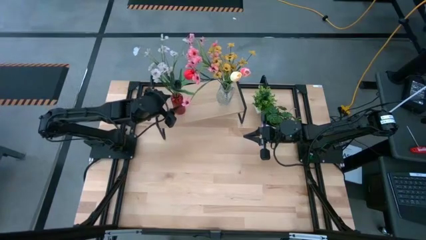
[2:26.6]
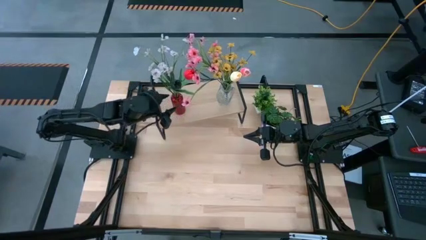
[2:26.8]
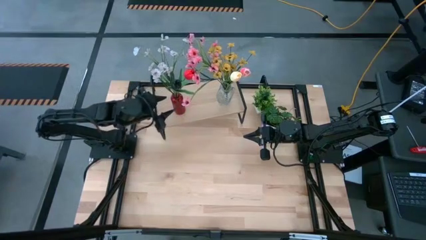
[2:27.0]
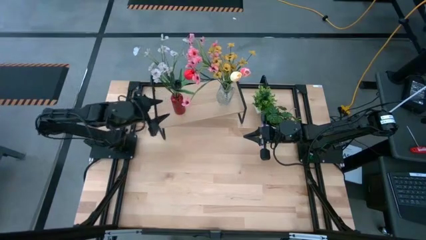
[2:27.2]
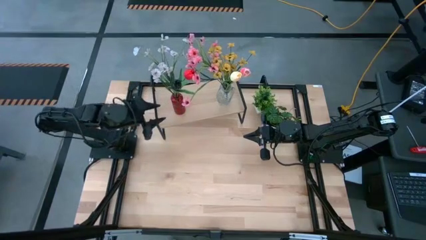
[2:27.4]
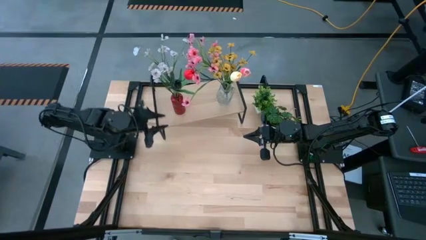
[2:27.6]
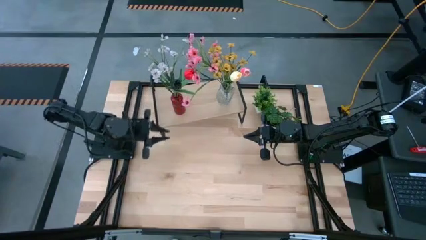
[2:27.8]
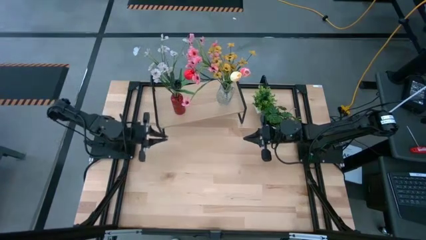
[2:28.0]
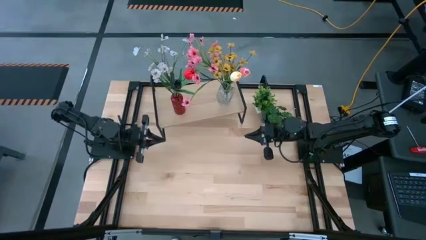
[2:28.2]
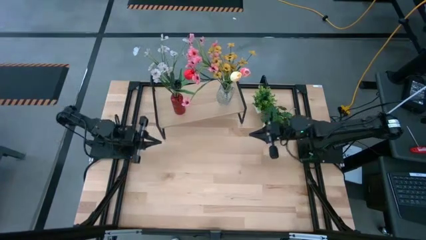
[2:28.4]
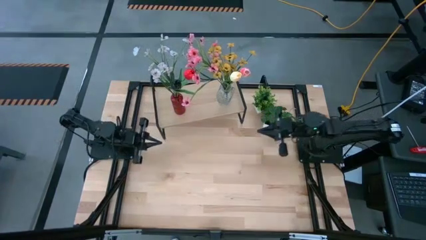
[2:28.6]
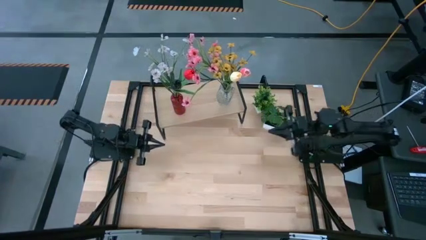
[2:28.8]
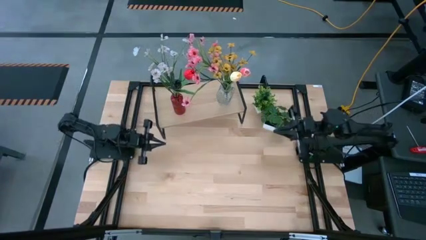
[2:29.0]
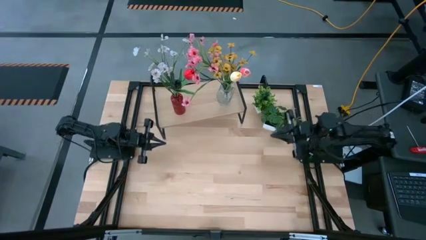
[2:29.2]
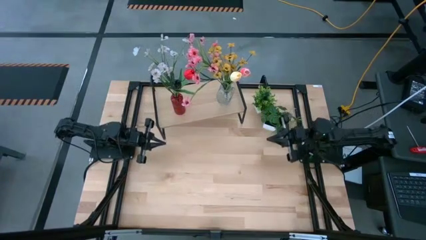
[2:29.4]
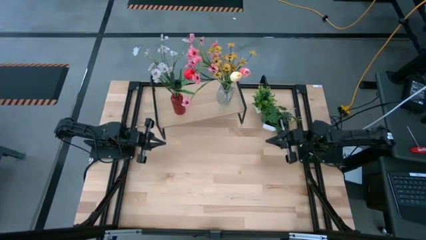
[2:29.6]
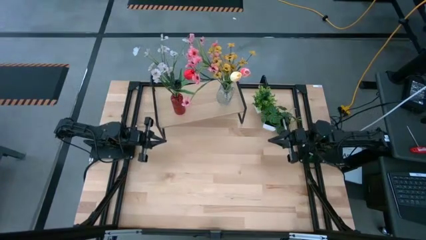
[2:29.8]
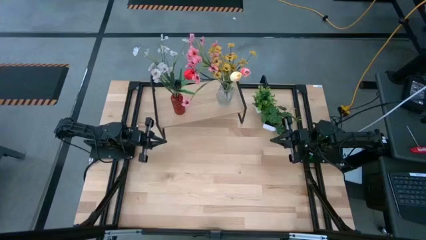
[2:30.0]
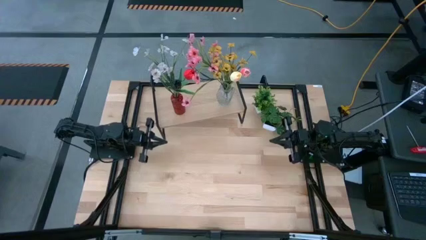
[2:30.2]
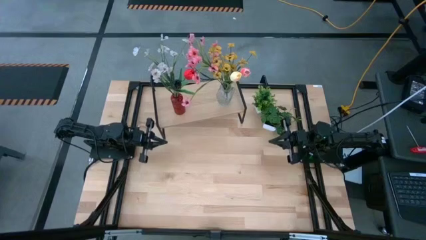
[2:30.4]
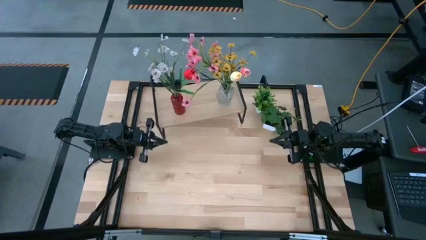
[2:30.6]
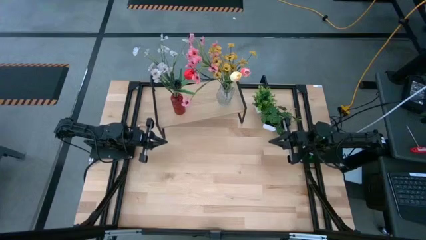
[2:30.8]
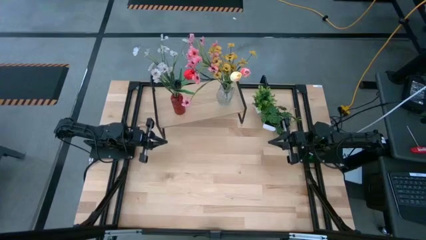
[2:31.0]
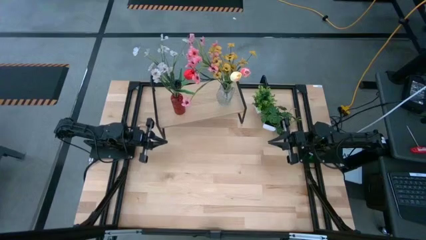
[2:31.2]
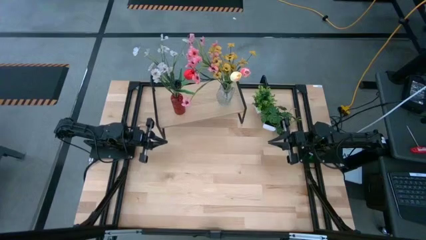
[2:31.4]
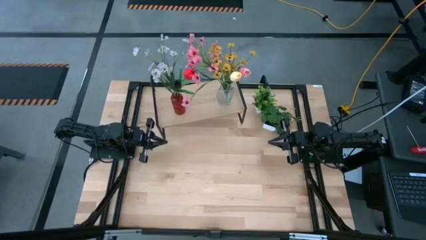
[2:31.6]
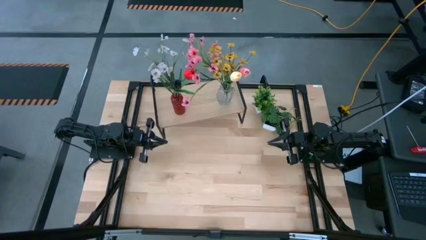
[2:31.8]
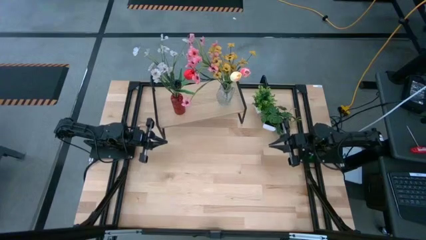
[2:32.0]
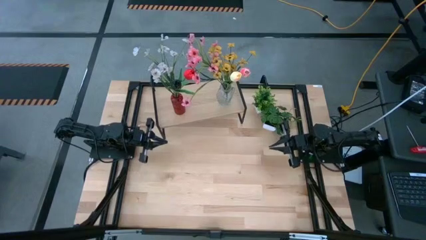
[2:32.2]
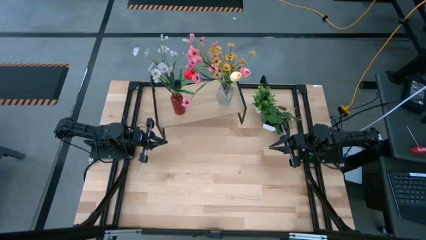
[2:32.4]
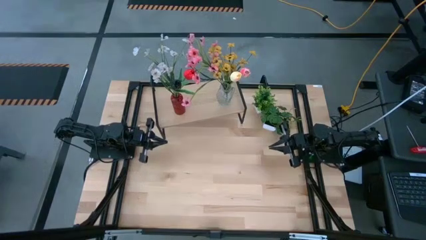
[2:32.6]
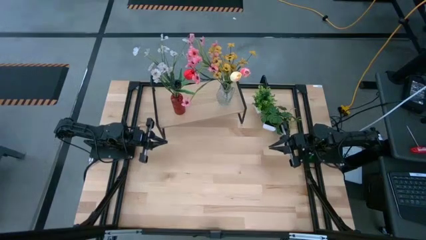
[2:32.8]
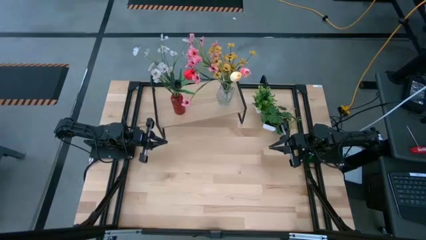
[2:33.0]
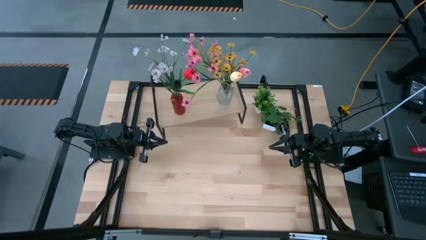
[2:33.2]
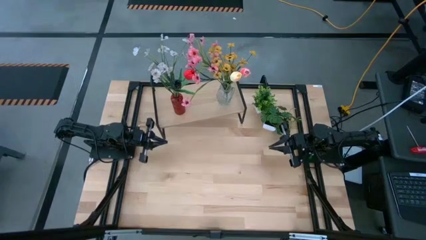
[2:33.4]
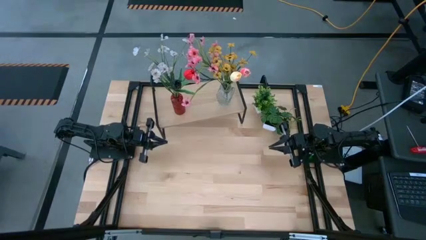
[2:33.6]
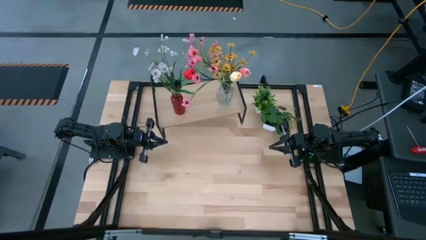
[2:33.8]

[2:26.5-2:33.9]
Task: Pick and place flowers into a vace then onto a shelf
Return to Home Position

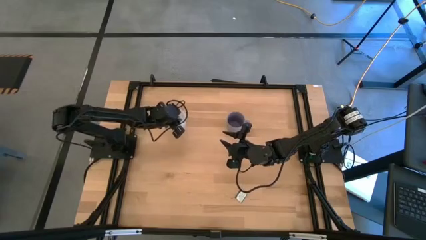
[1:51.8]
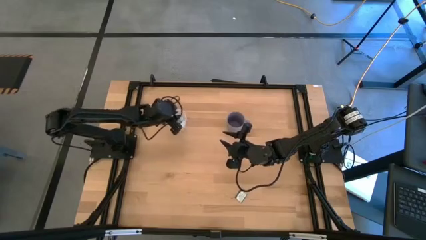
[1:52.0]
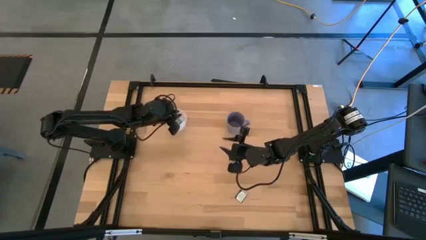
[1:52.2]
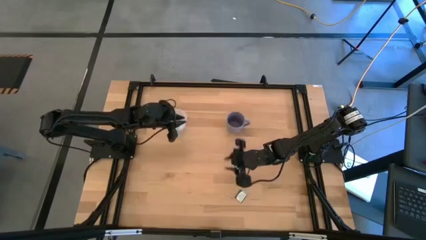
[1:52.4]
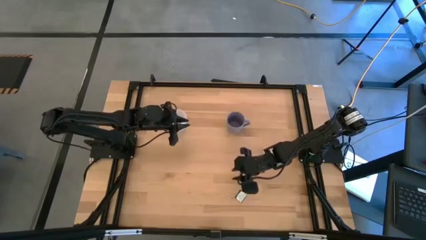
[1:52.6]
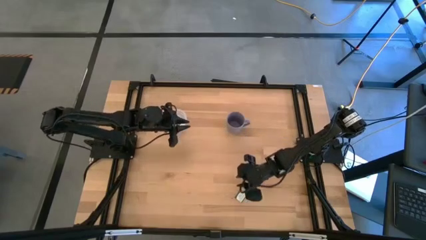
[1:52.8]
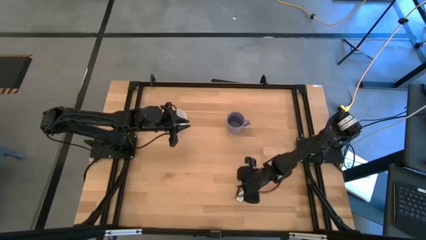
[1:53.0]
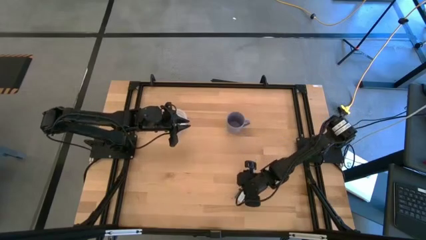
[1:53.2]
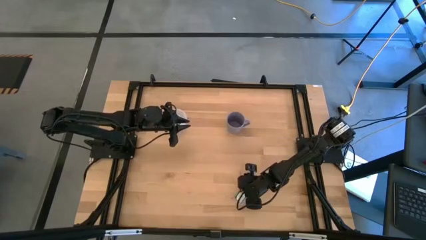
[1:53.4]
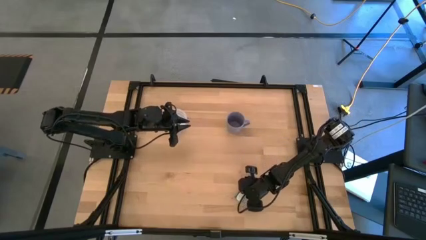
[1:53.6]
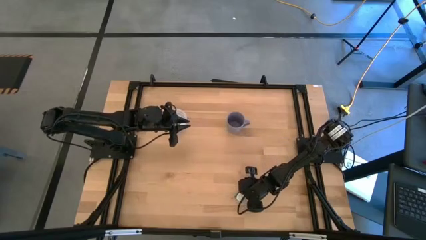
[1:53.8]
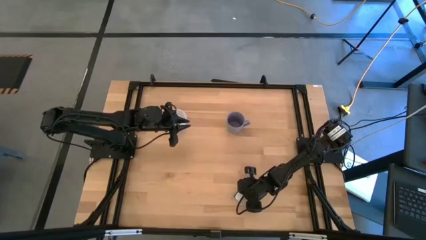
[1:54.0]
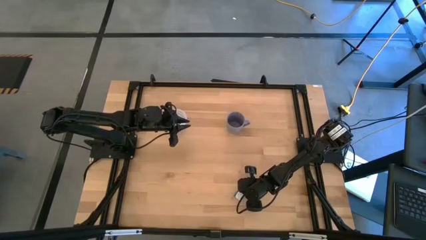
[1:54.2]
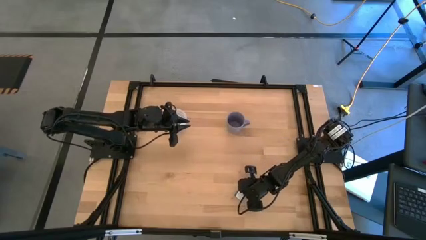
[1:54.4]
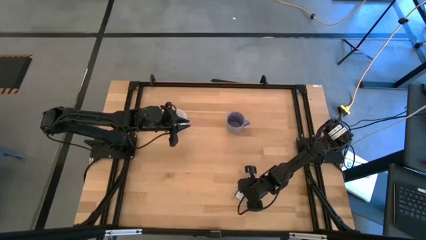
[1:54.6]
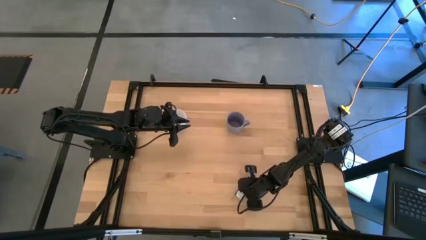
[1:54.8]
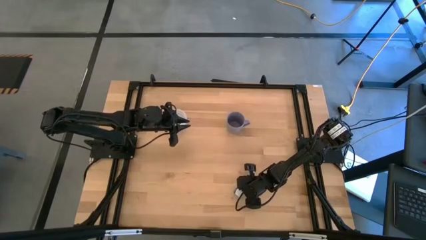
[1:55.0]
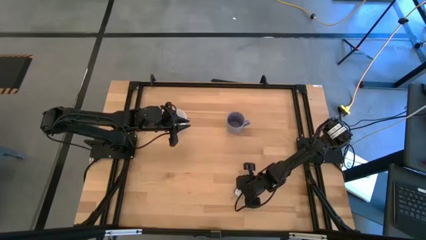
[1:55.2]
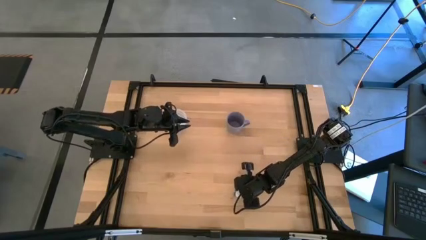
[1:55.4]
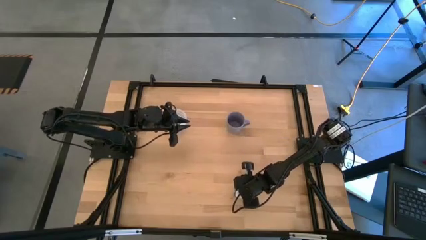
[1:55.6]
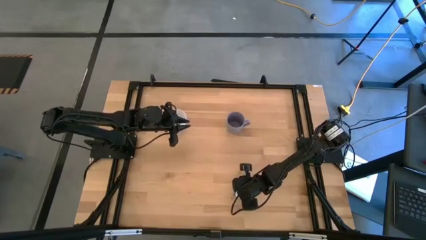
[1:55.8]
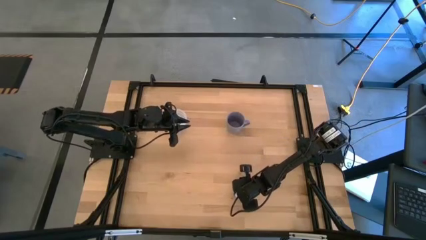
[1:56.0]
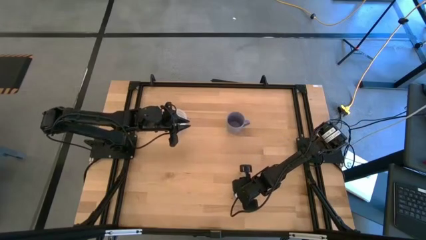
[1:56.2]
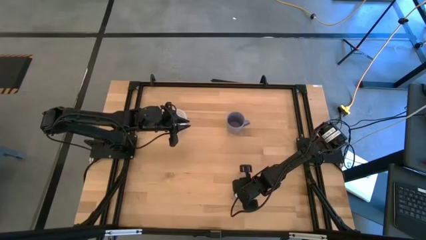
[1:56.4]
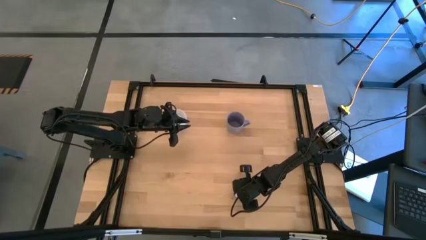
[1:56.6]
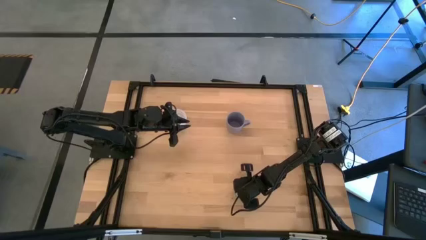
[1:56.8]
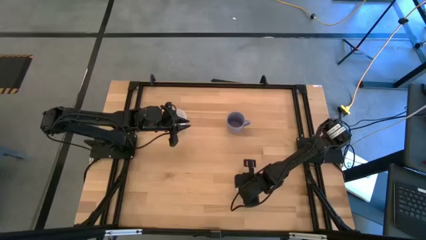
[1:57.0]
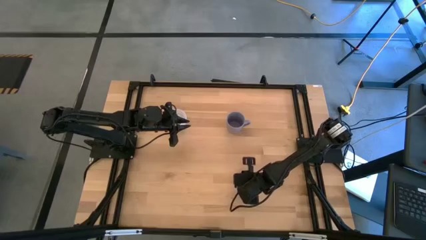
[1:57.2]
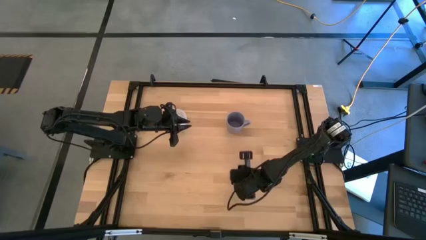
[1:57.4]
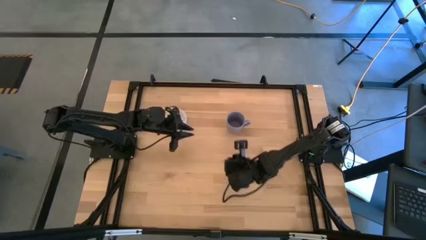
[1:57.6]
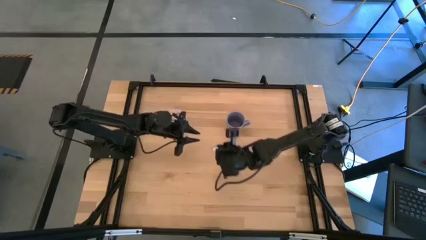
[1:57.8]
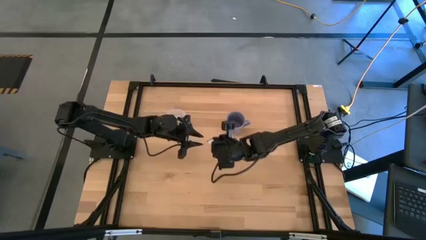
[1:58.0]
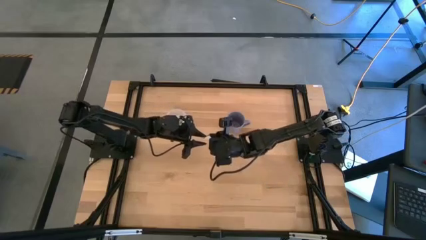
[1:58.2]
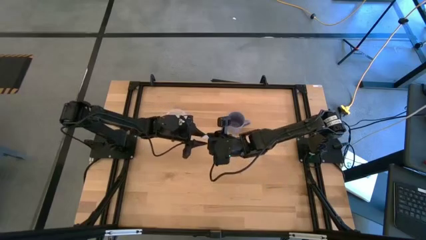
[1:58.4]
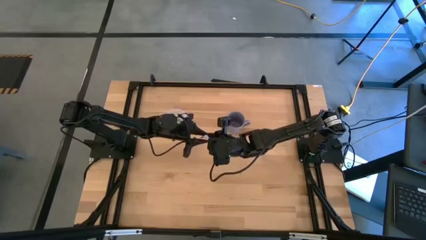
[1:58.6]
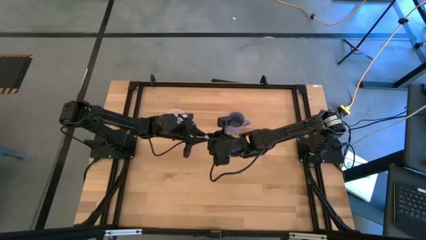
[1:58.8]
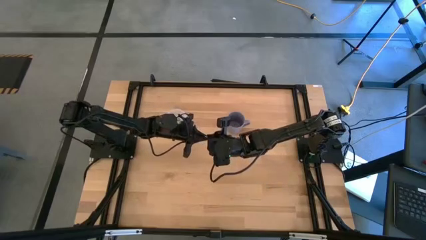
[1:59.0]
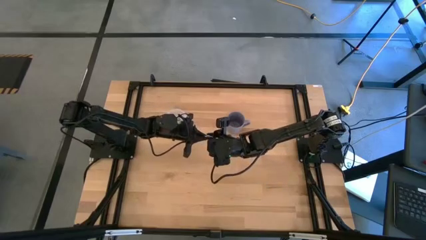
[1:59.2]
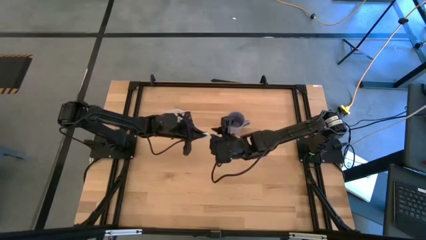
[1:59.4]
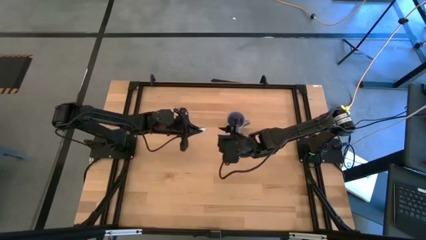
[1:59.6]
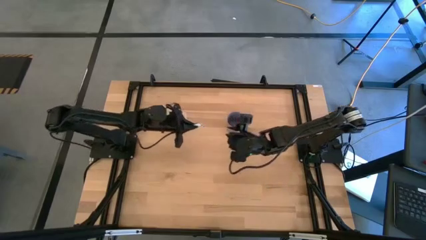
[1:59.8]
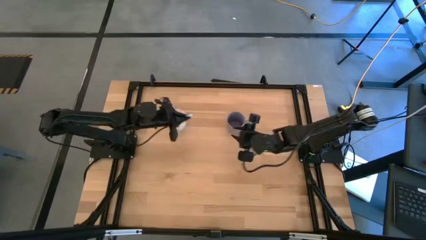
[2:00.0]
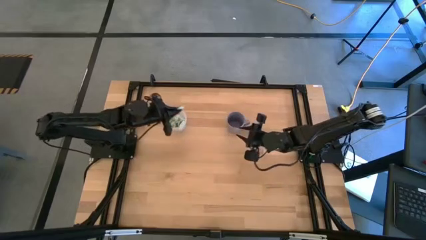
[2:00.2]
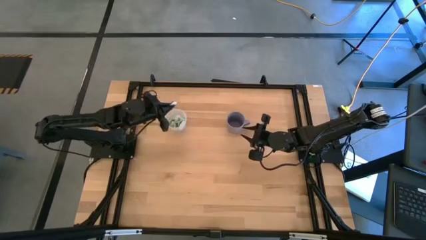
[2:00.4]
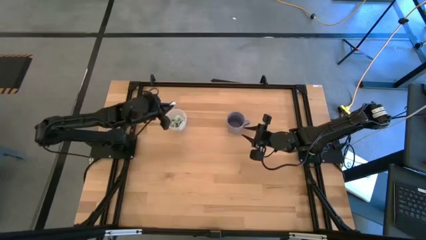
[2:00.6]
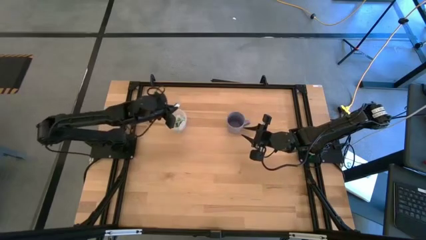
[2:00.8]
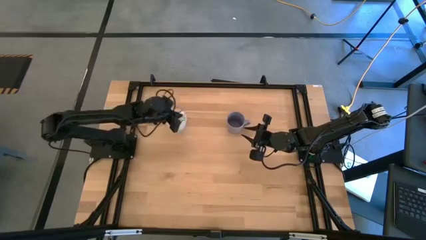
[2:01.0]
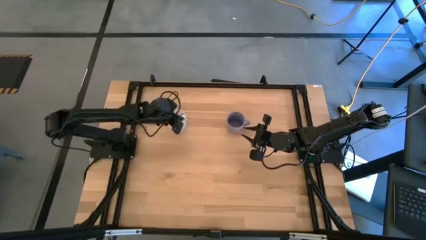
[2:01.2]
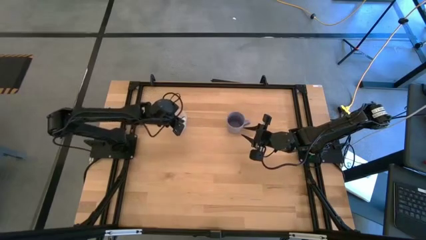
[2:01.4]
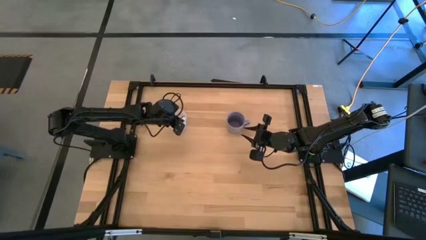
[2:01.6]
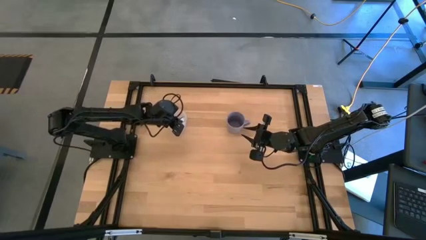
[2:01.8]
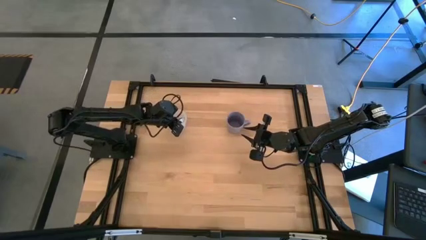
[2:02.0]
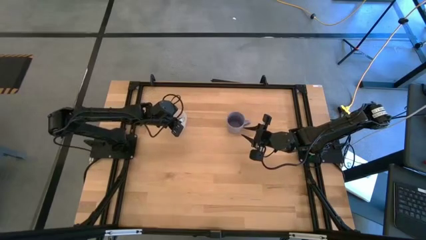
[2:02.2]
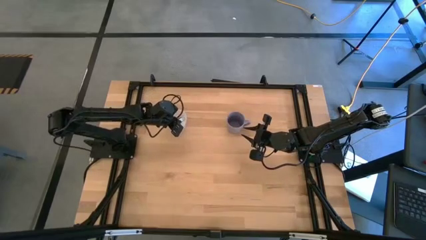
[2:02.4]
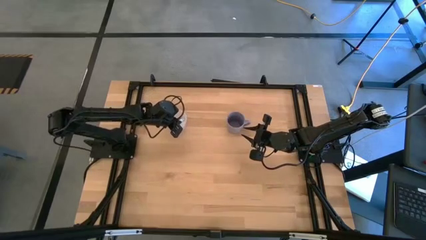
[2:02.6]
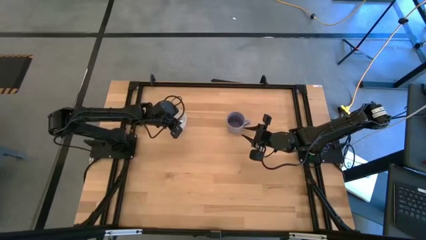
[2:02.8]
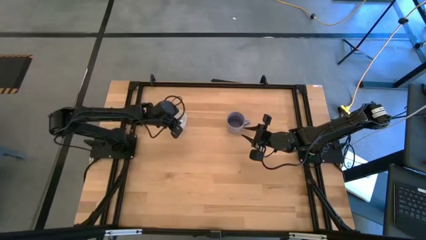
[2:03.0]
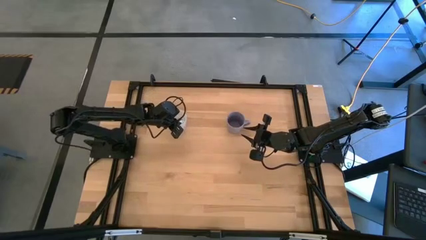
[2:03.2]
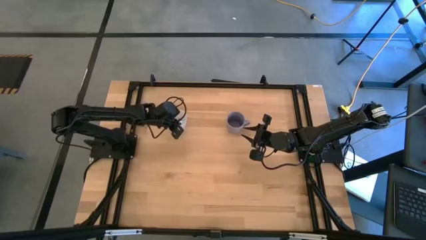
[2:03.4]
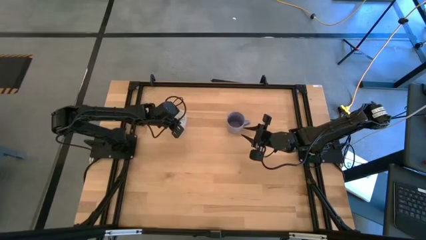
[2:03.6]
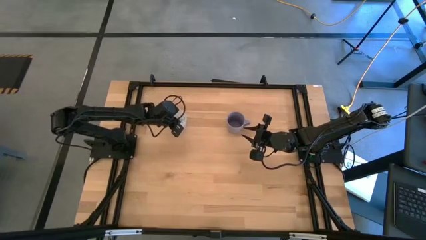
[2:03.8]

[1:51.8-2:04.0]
Task: Pick and place Stevia / Truvia into bins
Put the green stevia packet into the transparent container
